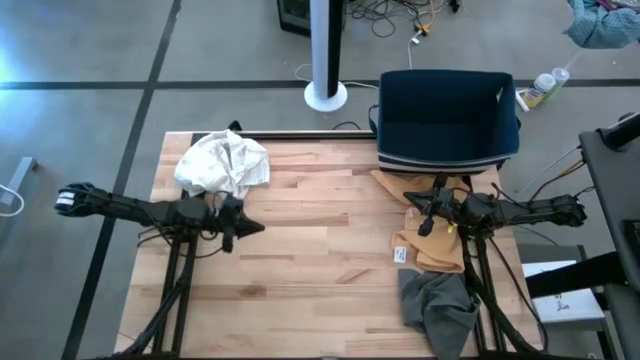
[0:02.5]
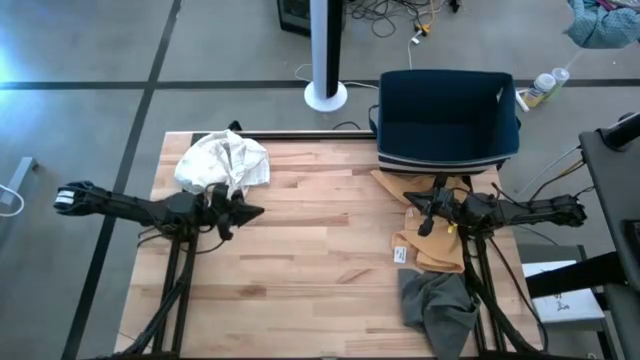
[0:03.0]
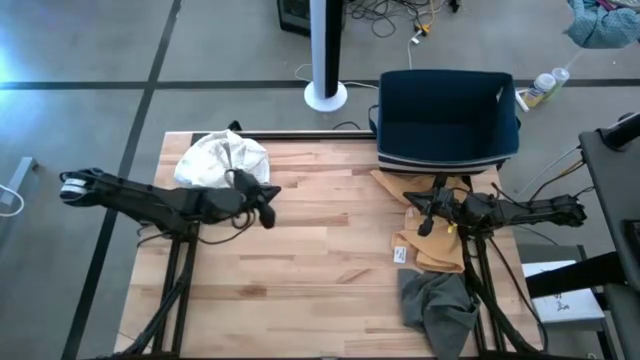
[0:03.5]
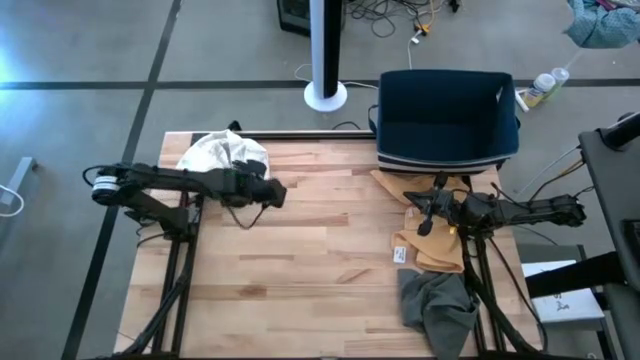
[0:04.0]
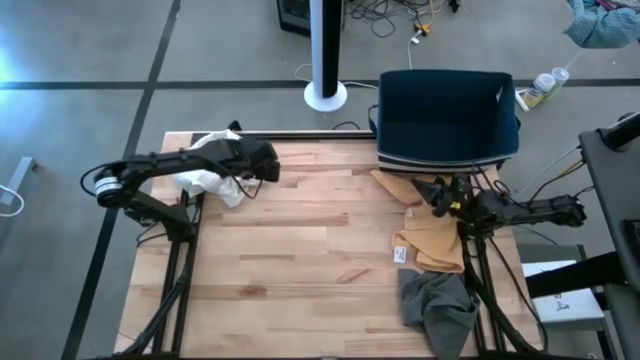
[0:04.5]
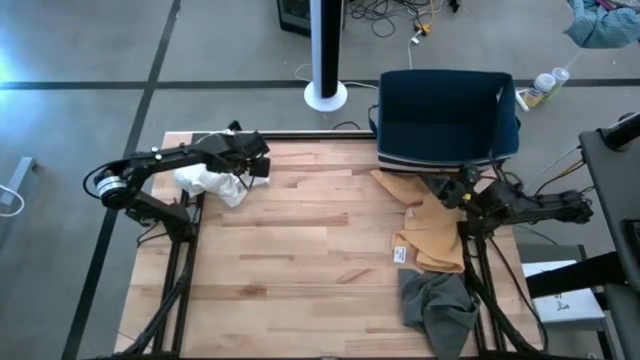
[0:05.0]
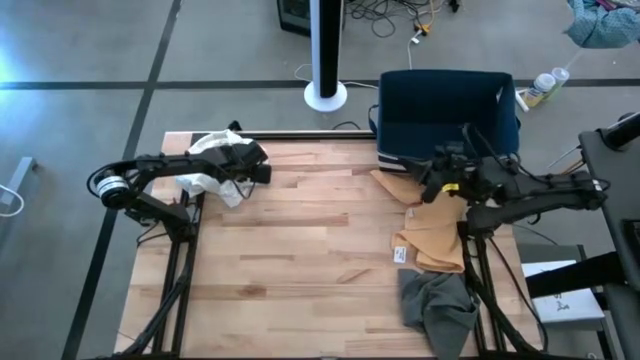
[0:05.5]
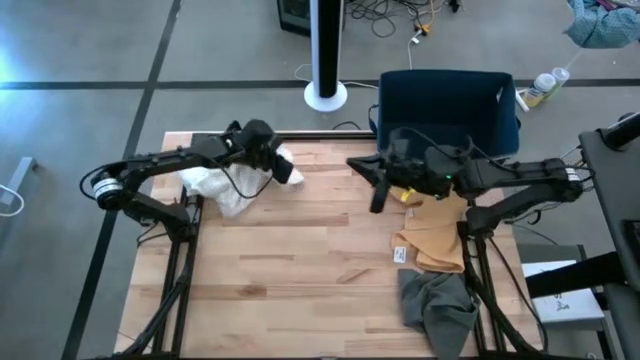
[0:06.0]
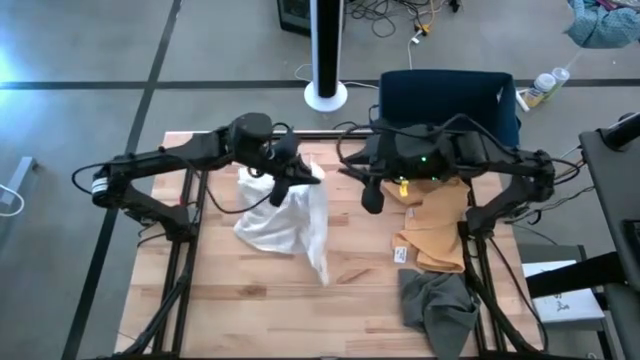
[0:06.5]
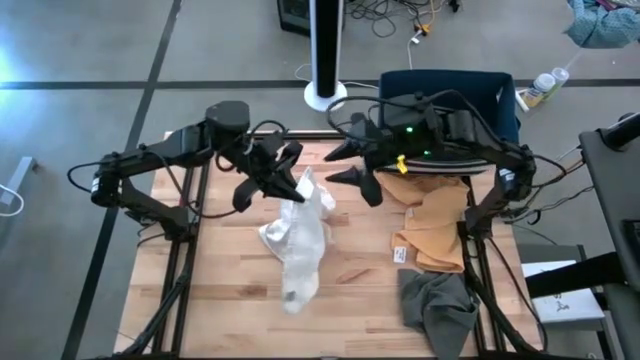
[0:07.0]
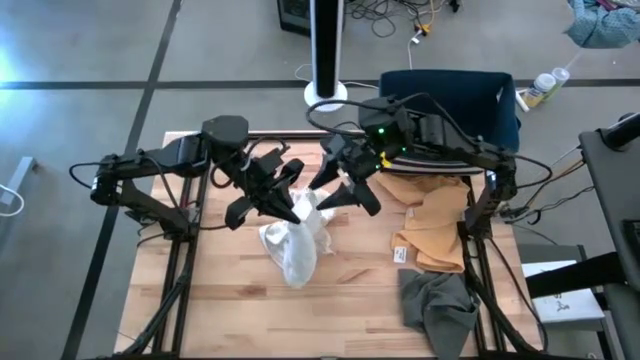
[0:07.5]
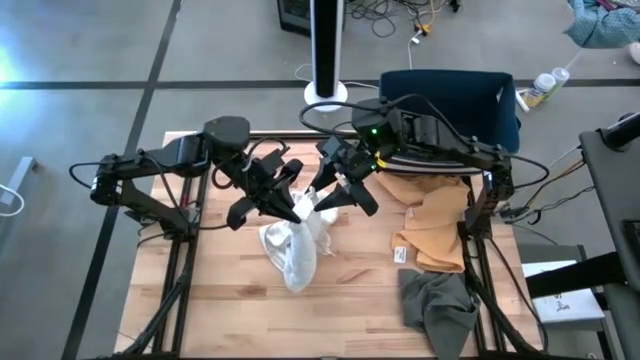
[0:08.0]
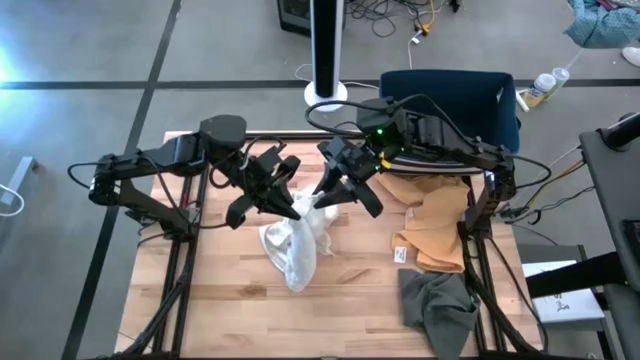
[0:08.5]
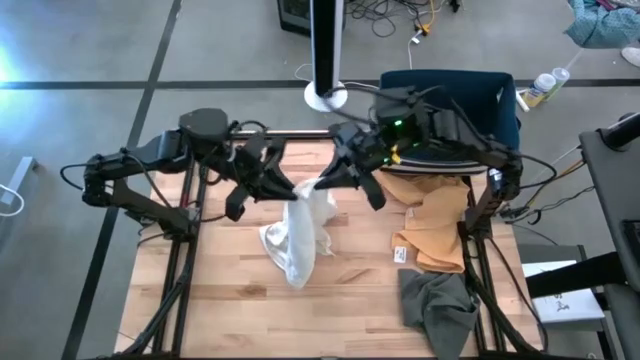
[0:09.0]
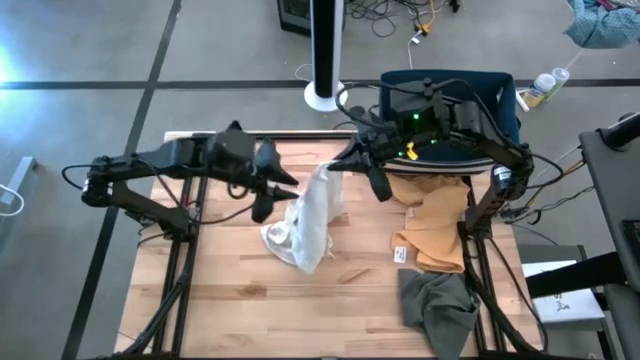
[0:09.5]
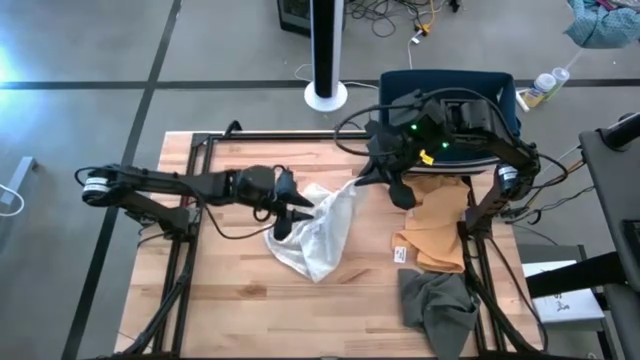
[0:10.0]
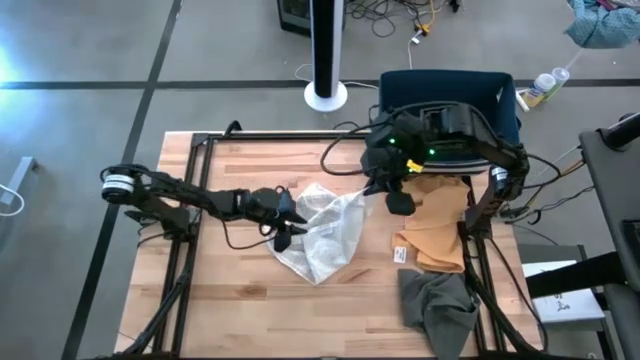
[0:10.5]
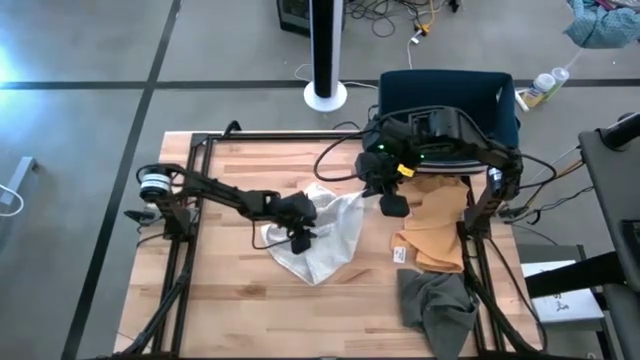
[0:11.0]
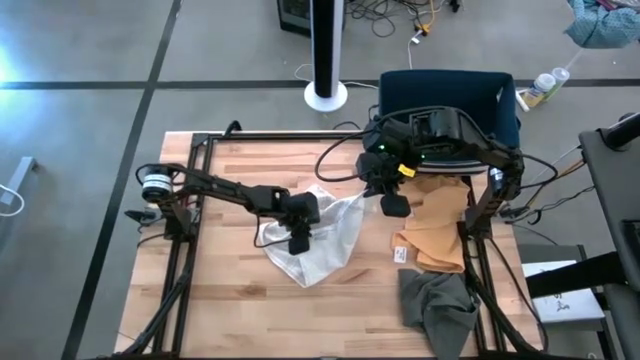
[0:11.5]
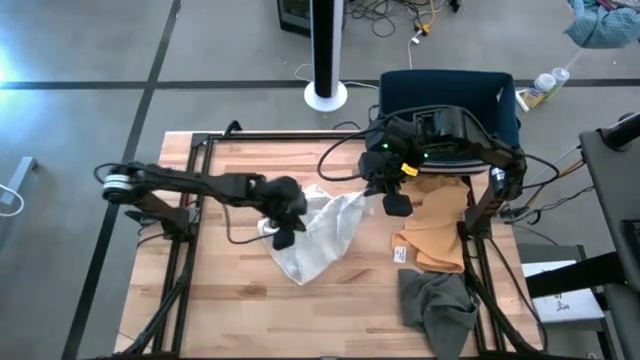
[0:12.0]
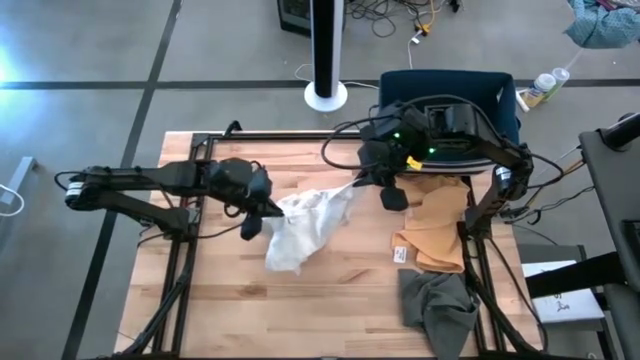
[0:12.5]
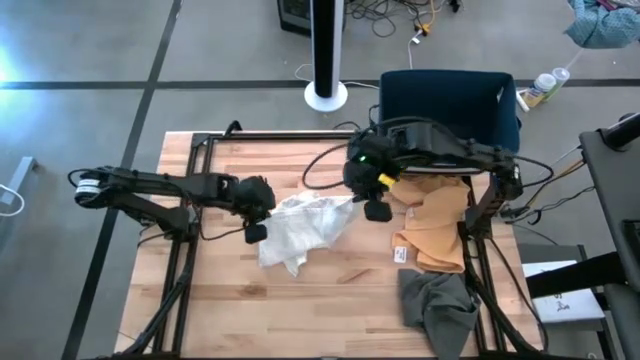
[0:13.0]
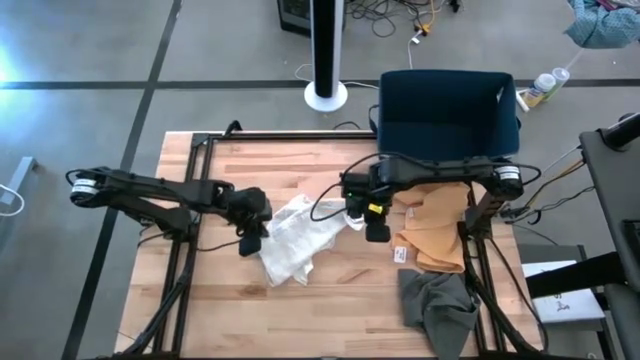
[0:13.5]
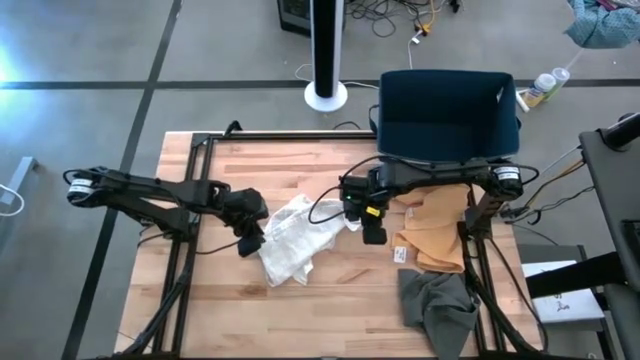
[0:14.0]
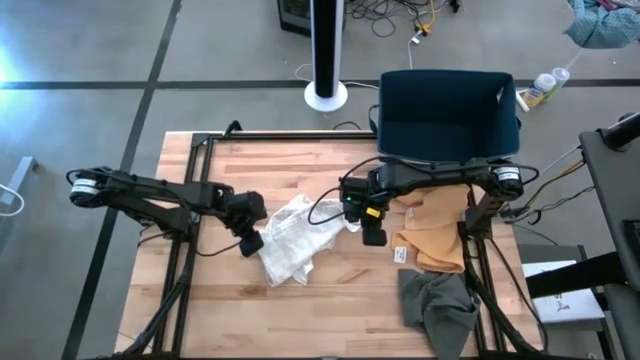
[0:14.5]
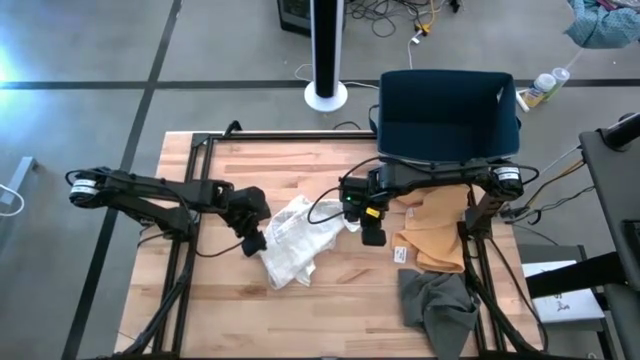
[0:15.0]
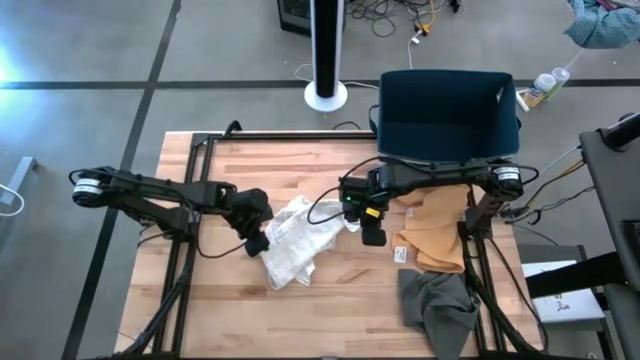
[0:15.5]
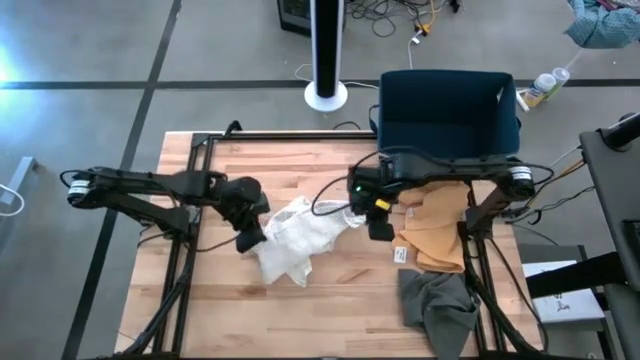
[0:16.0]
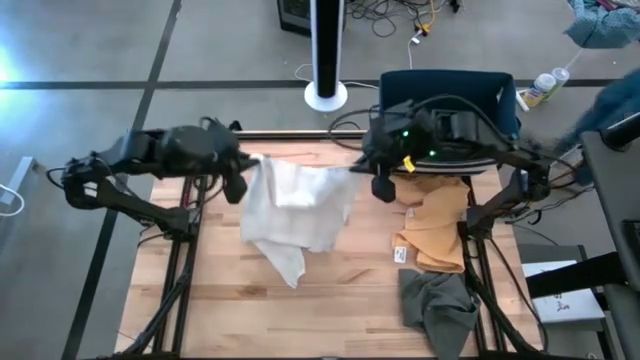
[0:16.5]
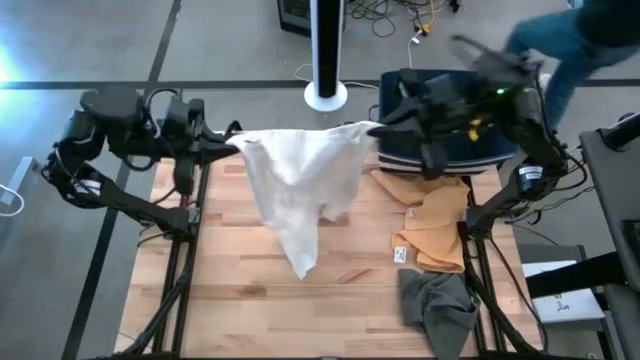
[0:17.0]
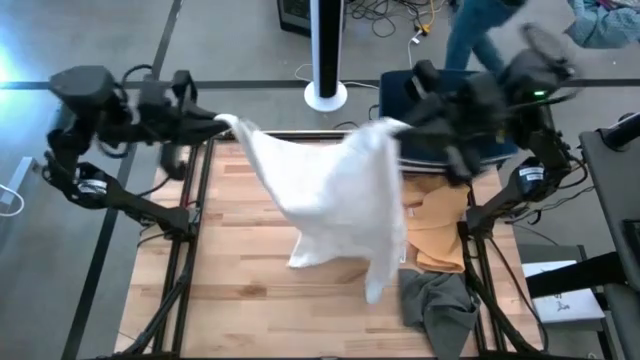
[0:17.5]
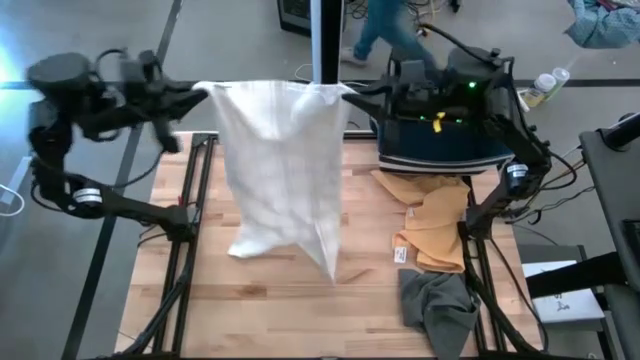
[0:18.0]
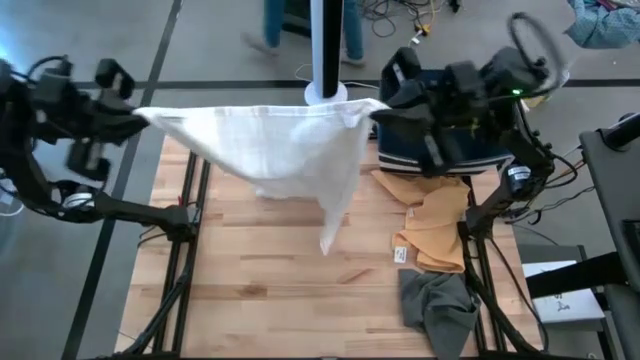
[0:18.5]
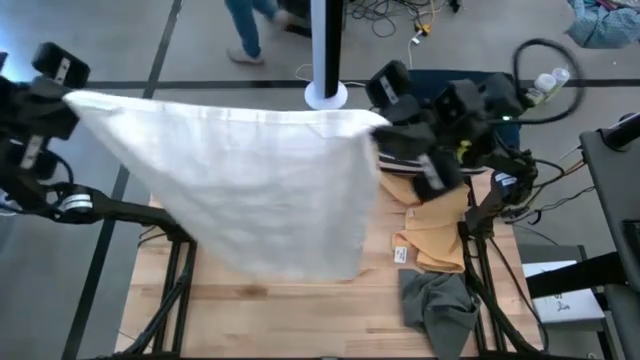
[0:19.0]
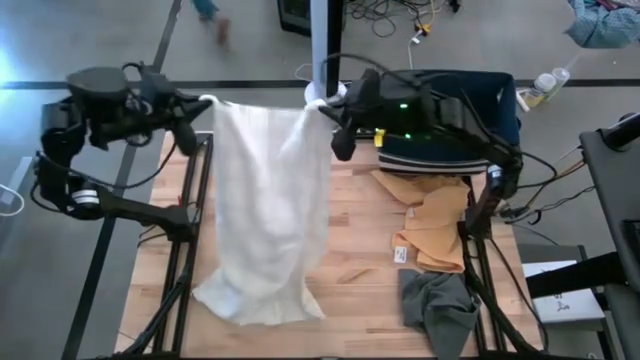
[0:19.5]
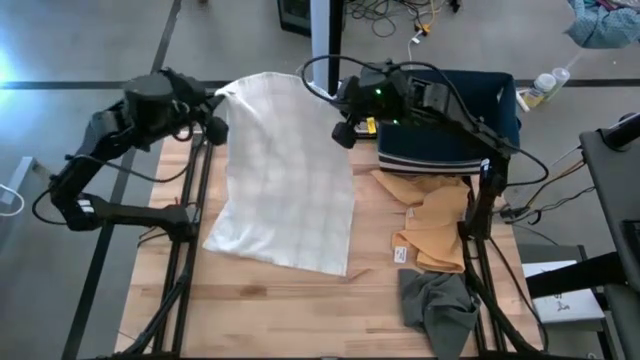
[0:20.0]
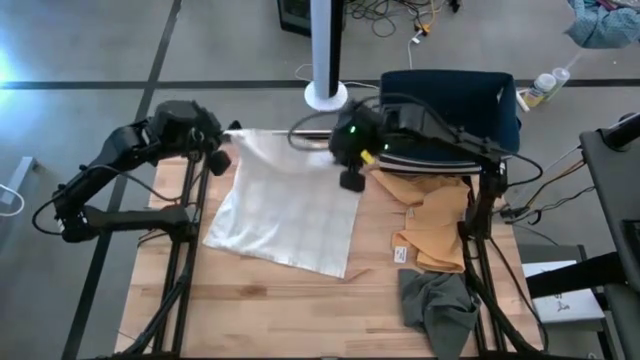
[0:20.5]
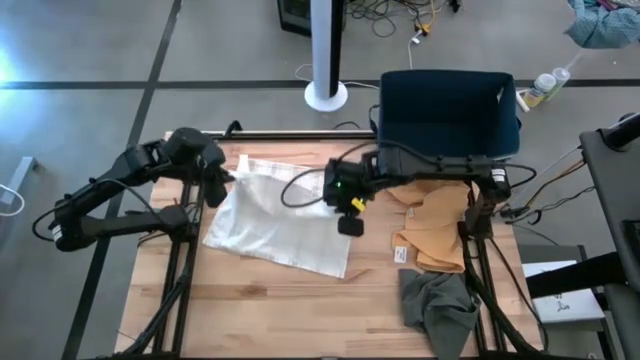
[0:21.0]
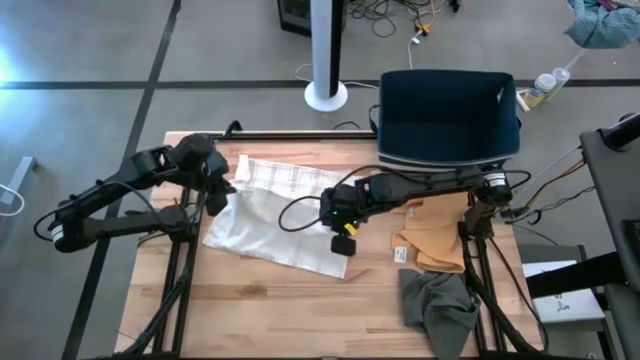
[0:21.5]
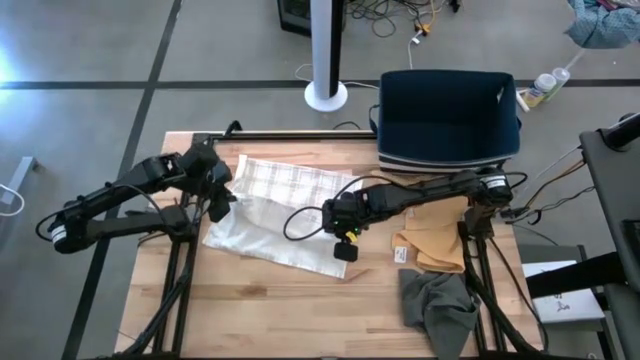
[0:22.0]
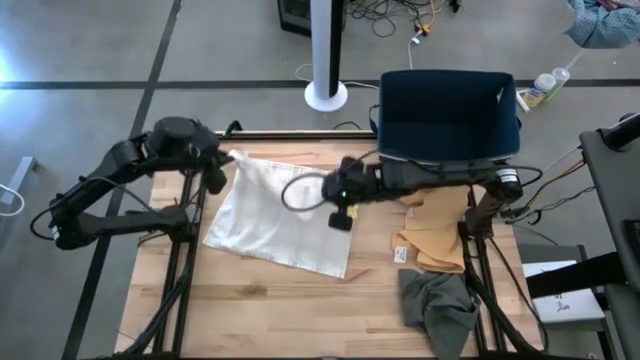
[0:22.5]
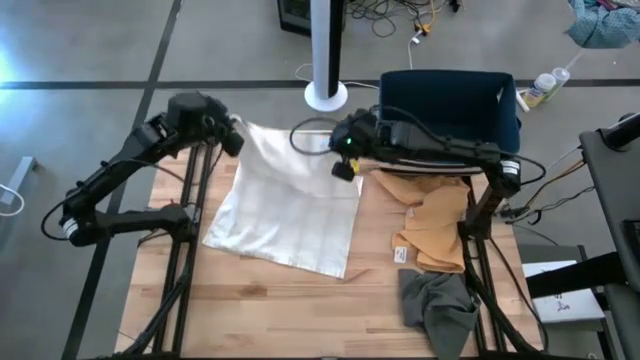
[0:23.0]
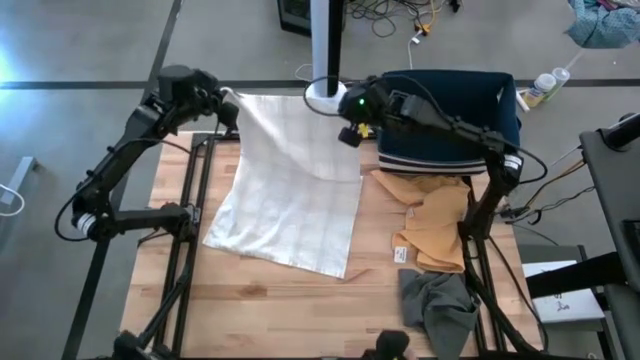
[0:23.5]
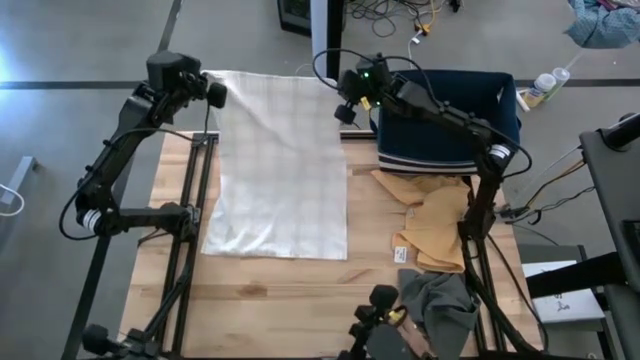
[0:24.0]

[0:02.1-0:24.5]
Task: Fold towel
Fold the white towel
